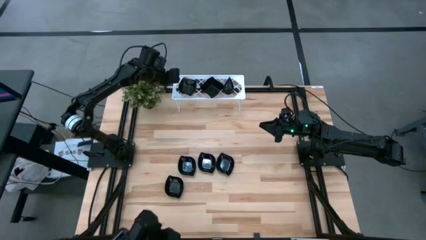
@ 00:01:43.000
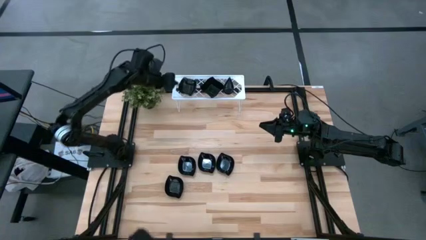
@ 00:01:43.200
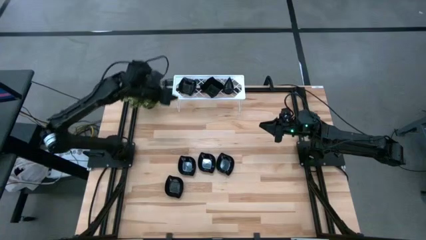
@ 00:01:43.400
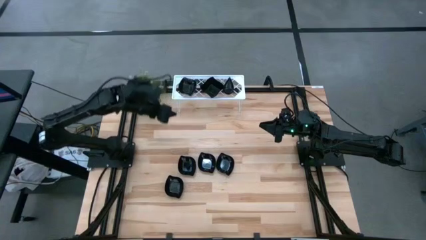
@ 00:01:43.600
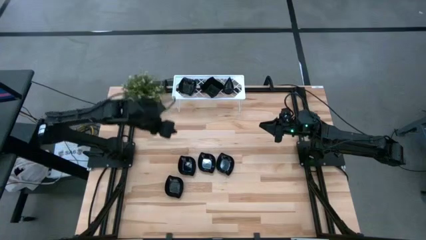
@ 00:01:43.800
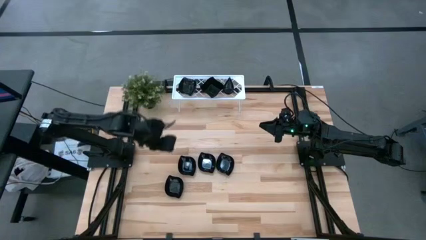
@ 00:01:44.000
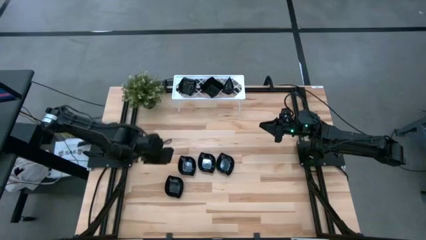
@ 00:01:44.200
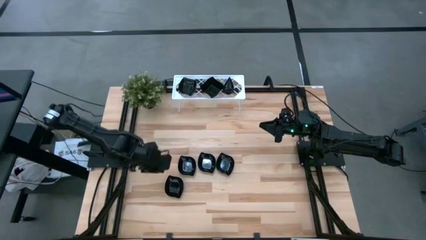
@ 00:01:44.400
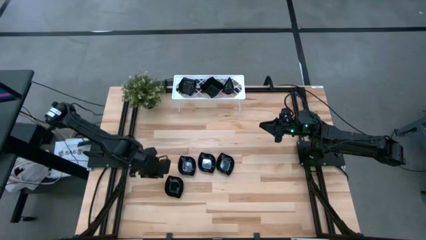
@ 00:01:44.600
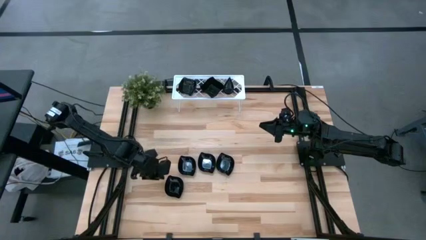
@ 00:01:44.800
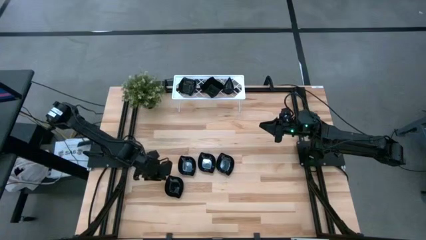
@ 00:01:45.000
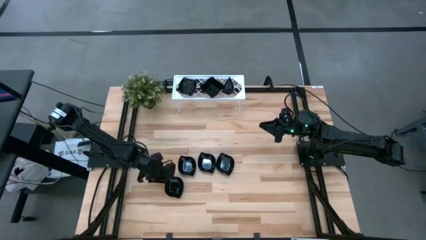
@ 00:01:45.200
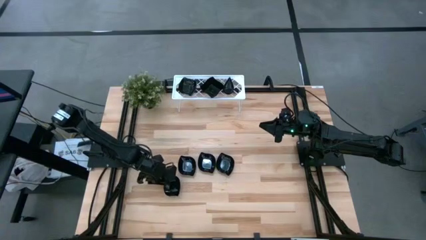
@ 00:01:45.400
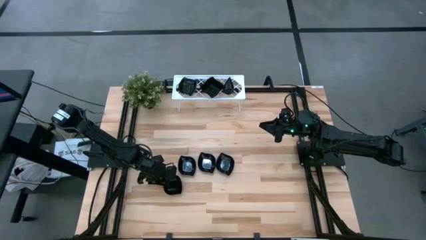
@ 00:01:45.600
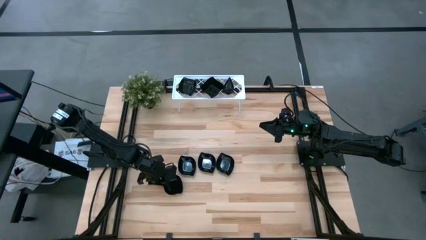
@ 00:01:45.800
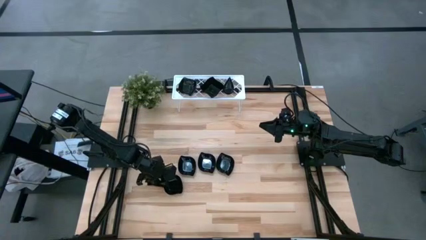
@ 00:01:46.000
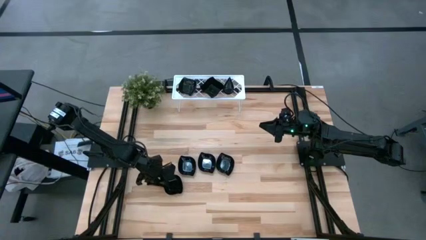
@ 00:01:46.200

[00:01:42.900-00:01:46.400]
Task: Pick & Place Mini shaped plates
Stack the leaf-shaped plate on top of the leaf-shaped plate on the shelf

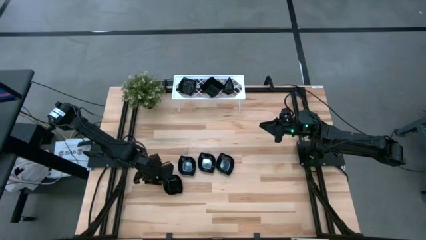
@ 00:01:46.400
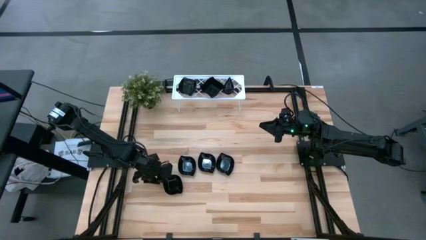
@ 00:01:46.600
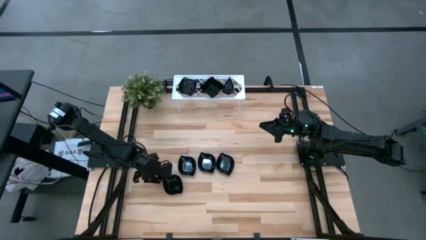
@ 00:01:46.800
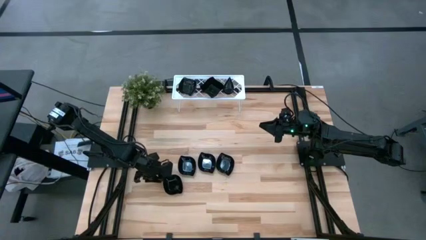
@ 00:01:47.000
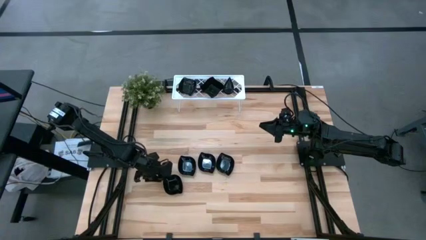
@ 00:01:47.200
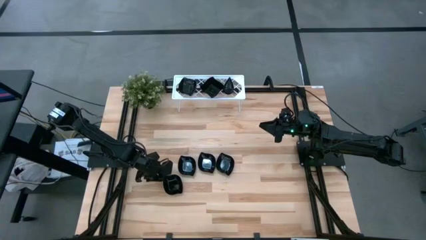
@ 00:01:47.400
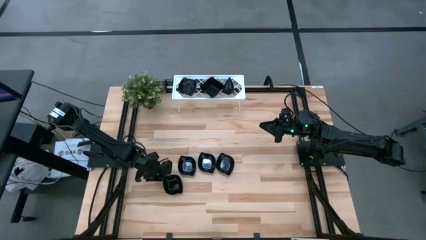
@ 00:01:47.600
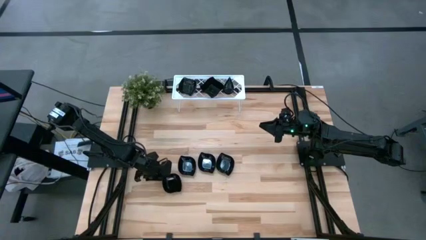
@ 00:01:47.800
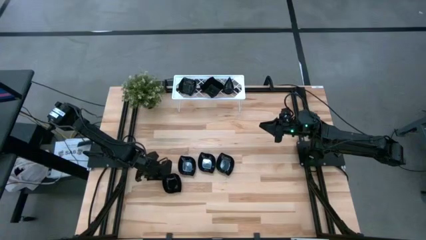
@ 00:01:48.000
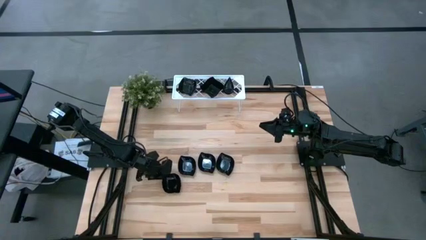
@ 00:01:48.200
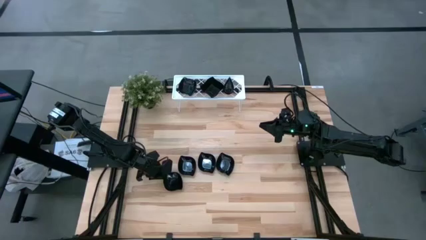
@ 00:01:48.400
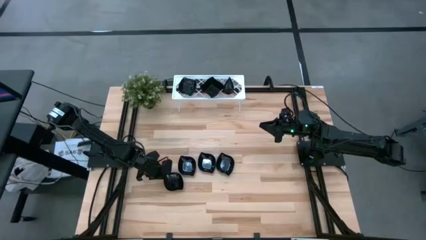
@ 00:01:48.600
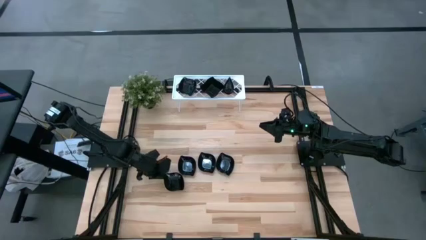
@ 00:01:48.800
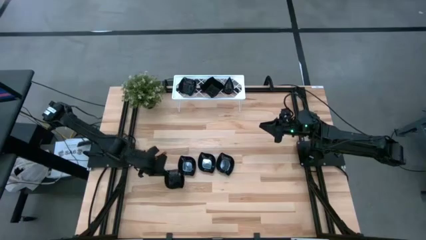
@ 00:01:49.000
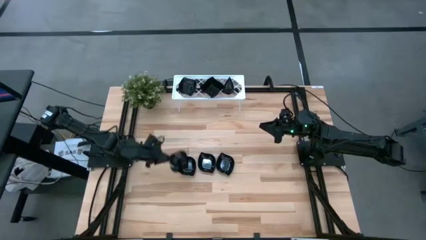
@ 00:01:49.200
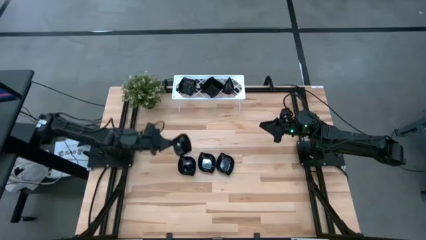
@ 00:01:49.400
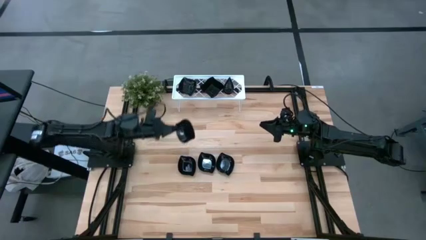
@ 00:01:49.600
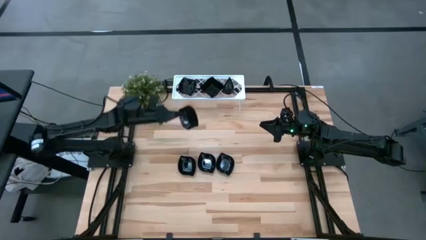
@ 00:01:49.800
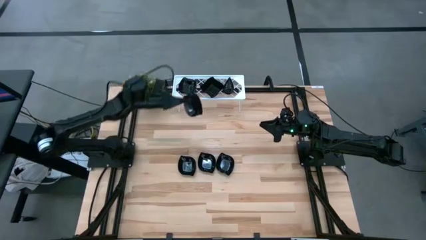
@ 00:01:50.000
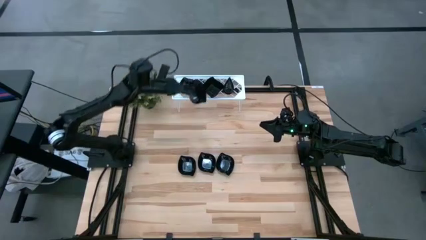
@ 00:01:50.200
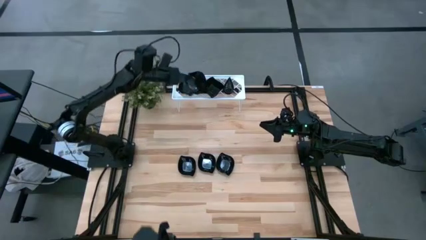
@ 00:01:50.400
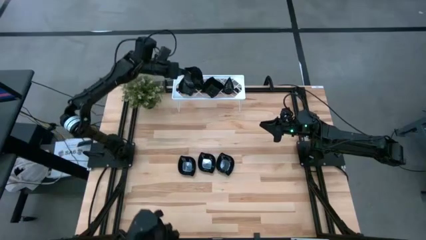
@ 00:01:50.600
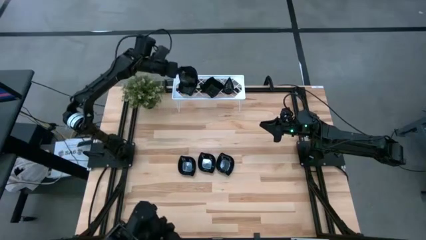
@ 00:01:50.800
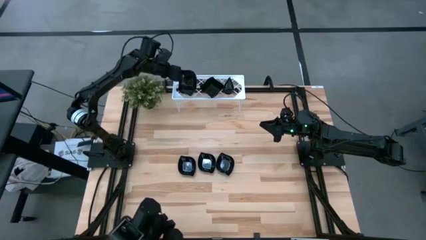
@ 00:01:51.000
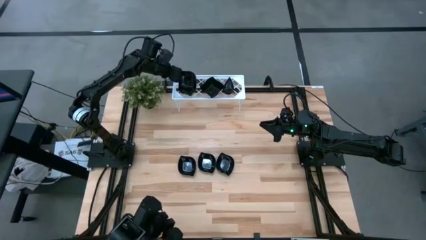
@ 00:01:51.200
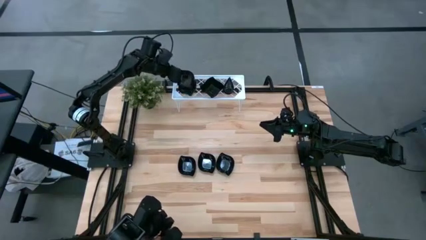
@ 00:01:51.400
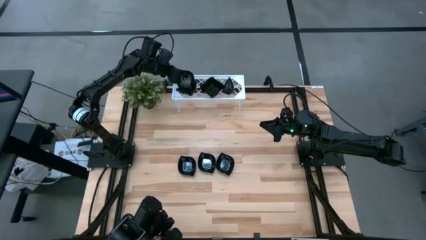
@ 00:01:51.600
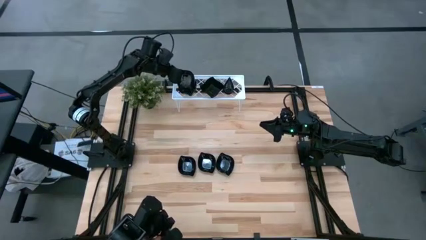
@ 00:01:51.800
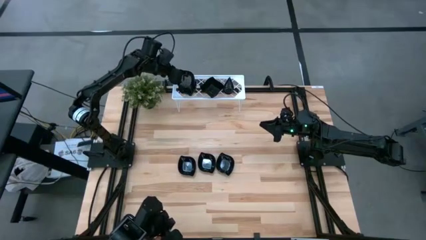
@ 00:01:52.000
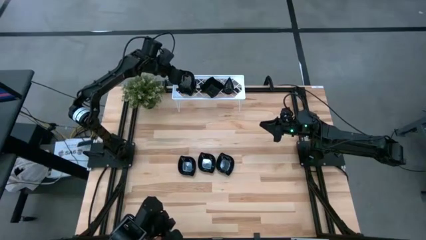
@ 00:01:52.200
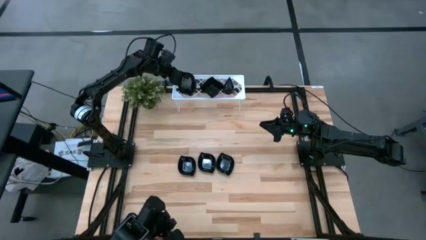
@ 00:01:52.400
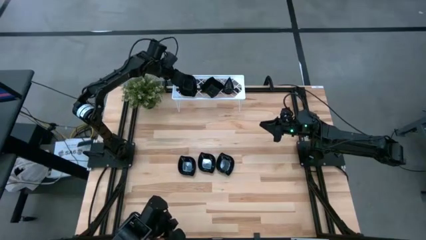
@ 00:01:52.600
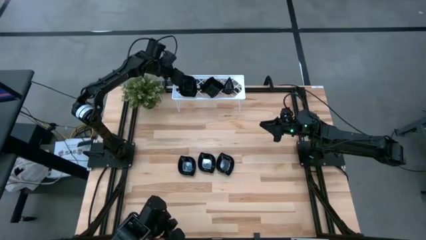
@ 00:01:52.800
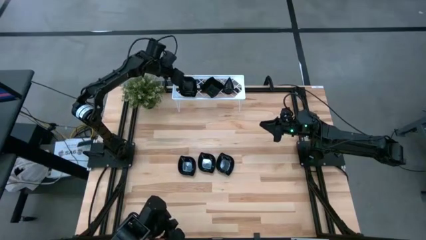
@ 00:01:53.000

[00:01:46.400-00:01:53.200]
Stack the leaf-shaped plate on top of the leaf-shaped plate on the shelf

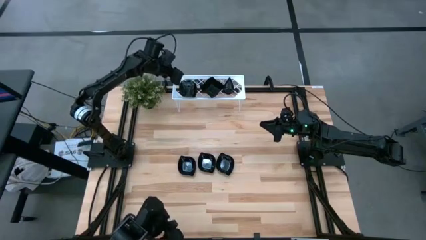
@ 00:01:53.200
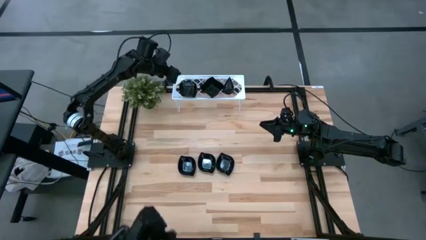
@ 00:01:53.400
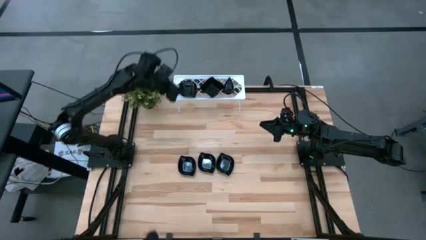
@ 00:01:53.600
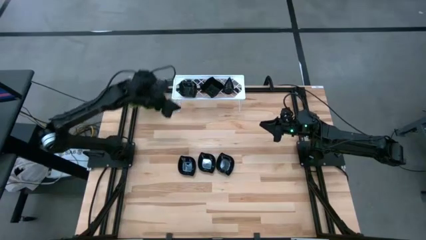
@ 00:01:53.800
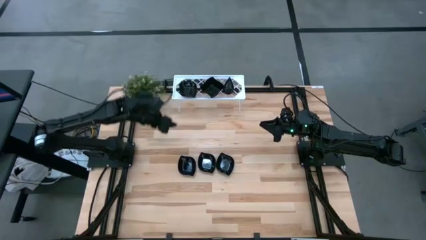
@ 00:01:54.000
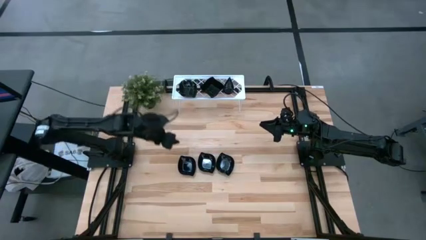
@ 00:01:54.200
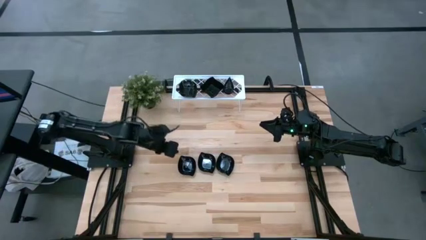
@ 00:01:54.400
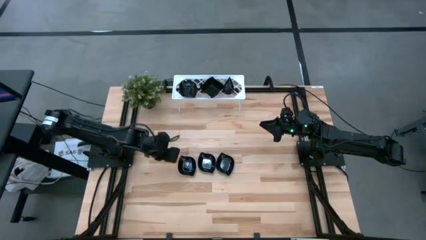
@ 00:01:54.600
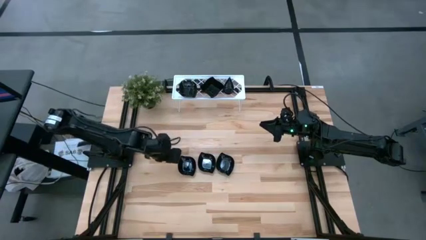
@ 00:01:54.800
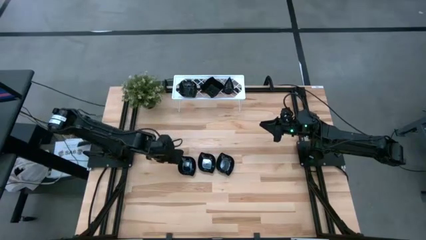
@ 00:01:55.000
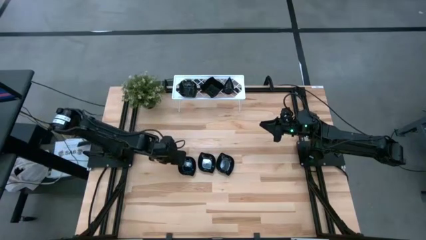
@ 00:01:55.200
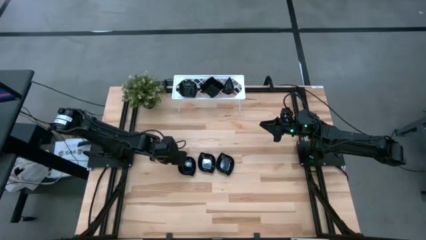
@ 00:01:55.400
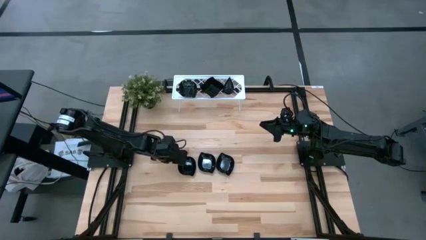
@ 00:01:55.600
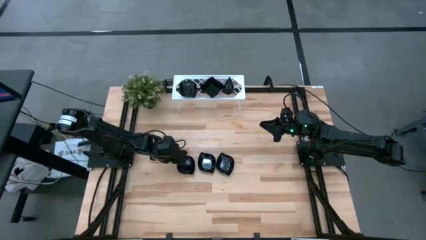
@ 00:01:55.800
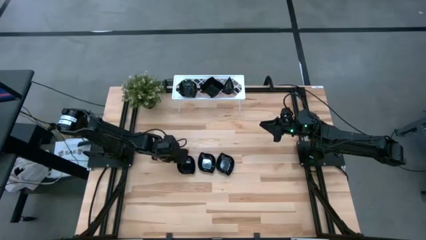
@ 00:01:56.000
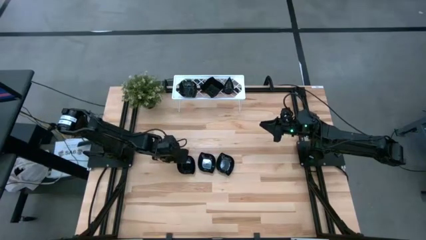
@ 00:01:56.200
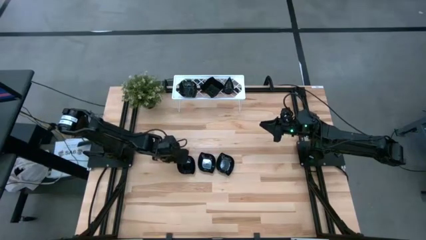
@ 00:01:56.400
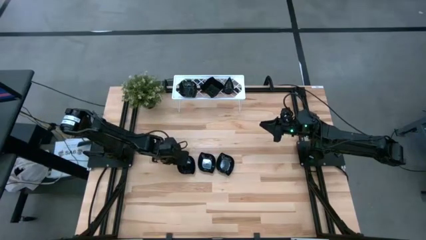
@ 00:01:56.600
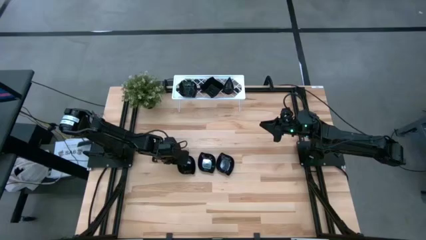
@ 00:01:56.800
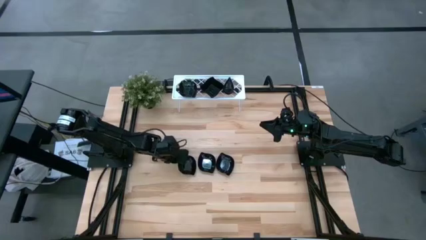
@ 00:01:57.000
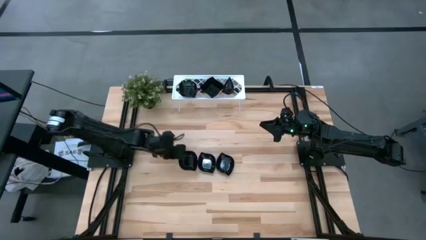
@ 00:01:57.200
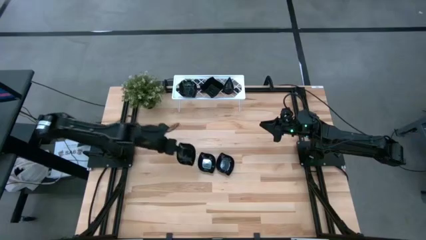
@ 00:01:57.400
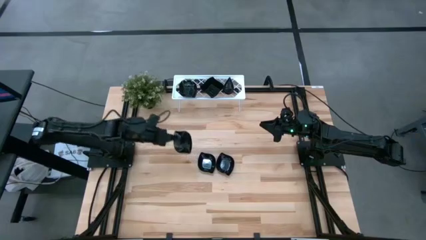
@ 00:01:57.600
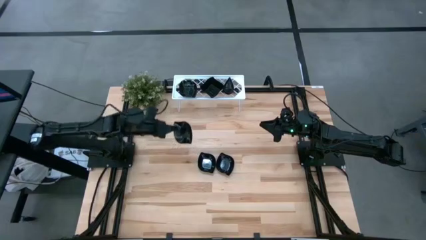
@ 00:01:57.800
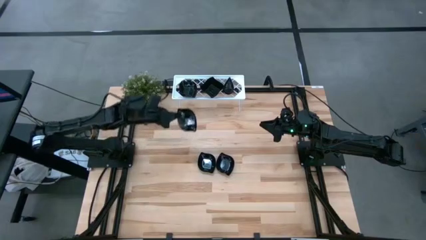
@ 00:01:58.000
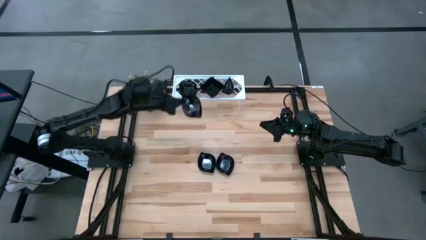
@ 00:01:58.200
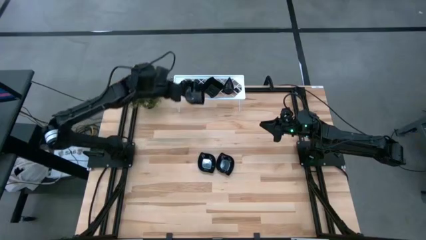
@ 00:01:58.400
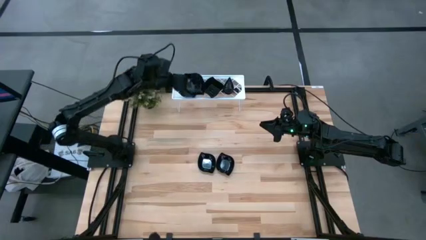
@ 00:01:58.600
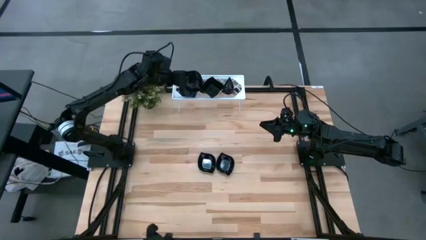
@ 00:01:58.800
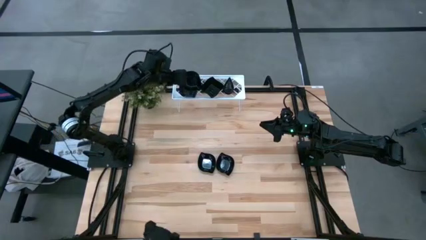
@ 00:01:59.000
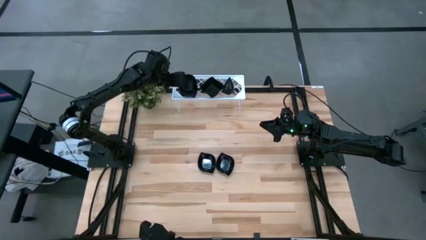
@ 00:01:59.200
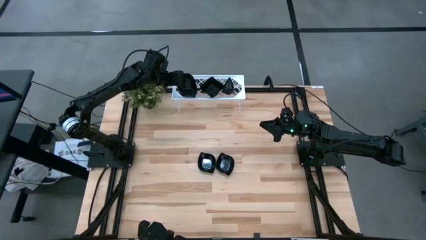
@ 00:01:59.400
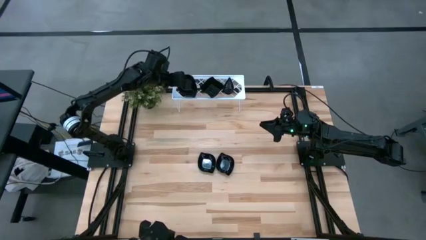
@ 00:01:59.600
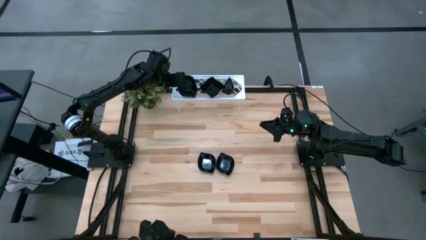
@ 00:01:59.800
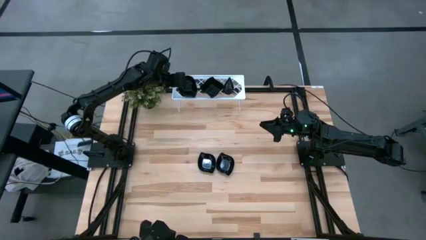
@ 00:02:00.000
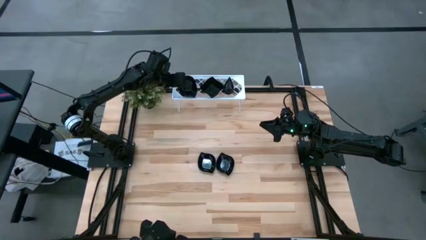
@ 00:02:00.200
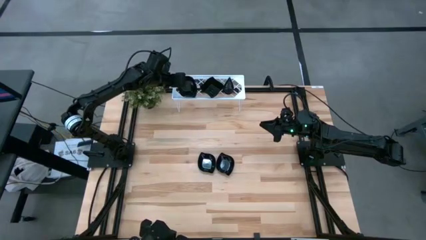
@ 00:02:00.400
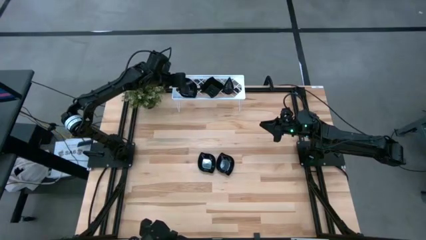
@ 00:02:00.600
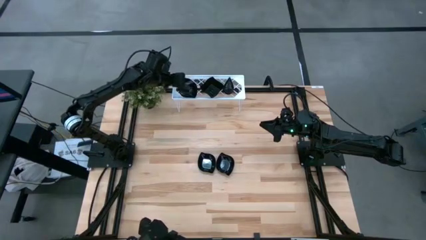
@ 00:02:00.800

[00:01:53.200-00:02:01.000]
Stack the leaf-shaped plate on top of the leaf-shaped plate on the shelf
